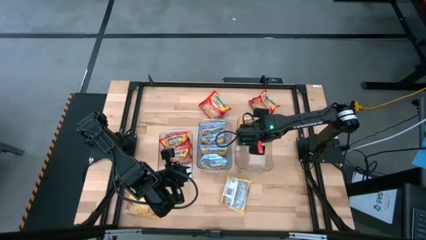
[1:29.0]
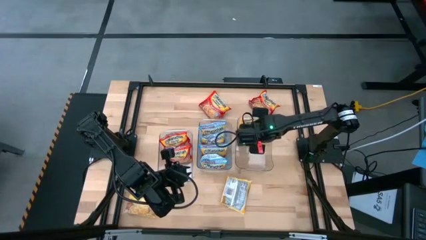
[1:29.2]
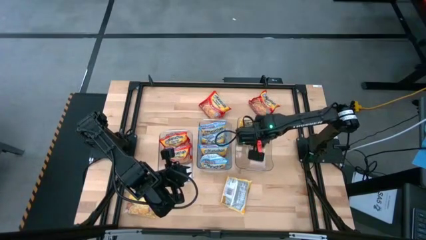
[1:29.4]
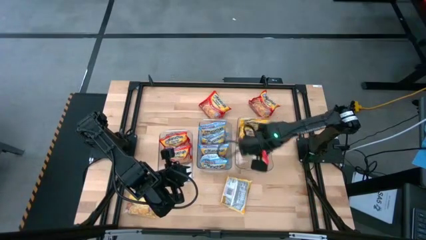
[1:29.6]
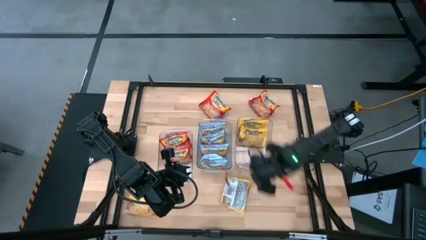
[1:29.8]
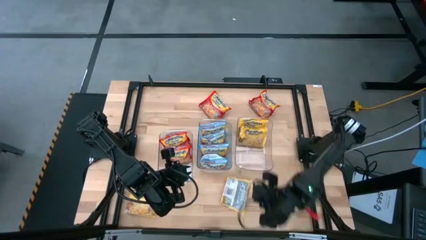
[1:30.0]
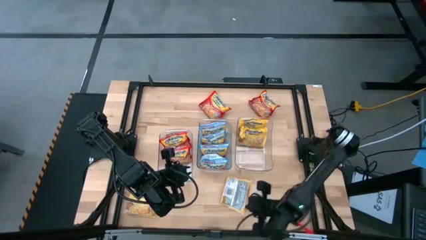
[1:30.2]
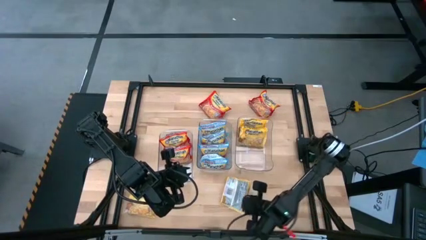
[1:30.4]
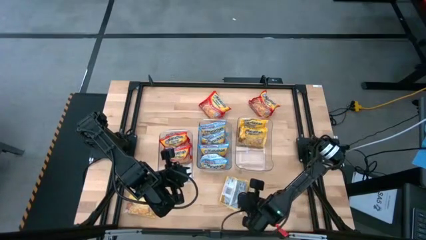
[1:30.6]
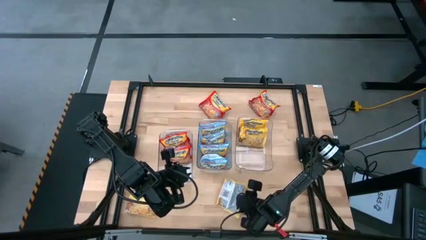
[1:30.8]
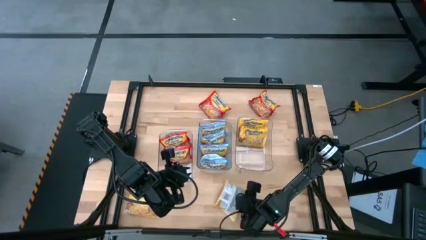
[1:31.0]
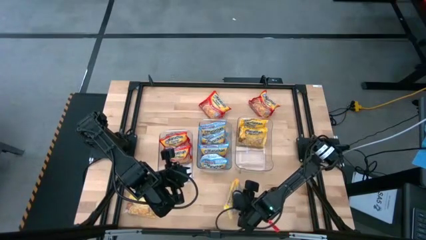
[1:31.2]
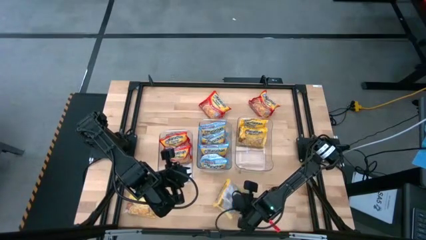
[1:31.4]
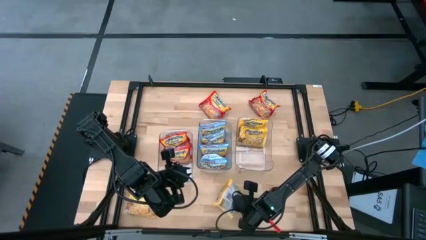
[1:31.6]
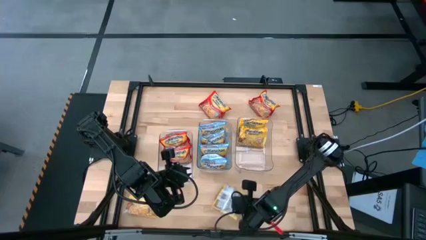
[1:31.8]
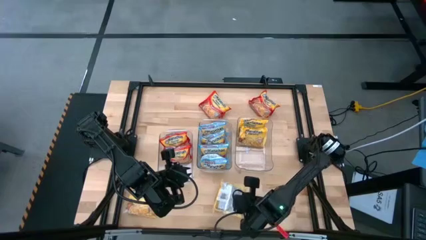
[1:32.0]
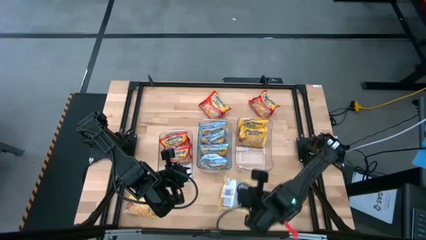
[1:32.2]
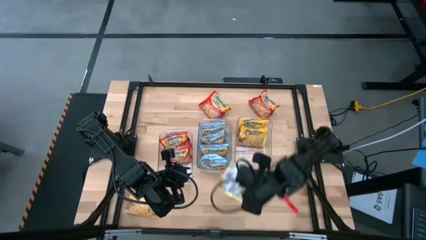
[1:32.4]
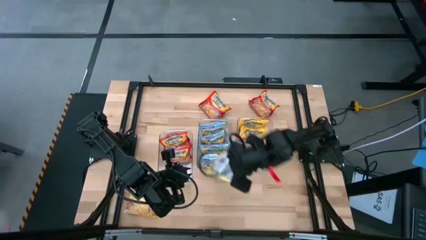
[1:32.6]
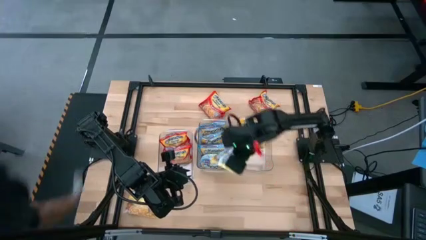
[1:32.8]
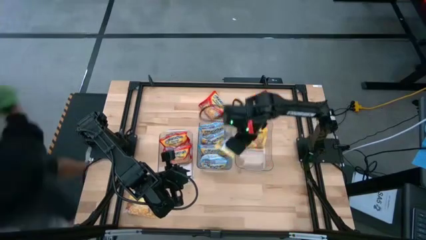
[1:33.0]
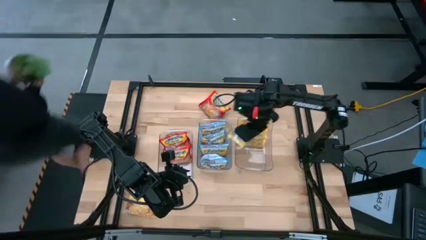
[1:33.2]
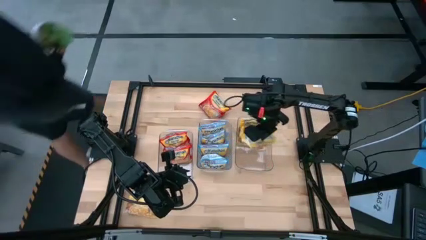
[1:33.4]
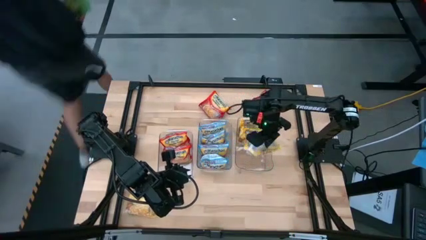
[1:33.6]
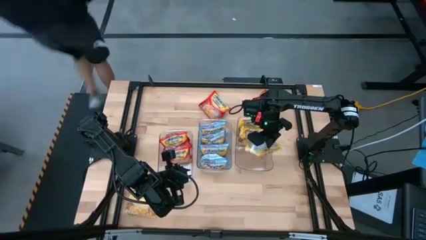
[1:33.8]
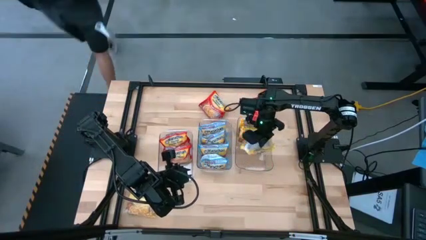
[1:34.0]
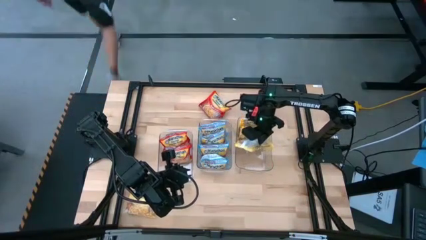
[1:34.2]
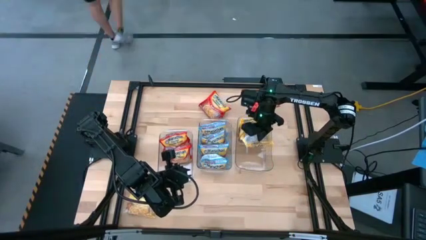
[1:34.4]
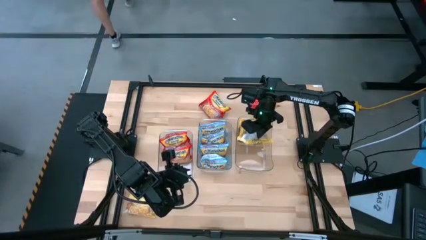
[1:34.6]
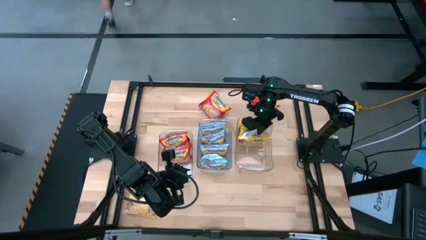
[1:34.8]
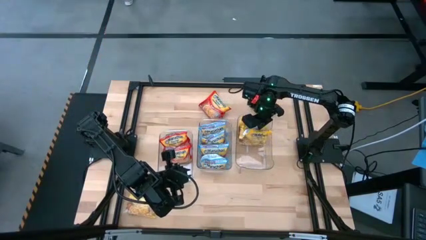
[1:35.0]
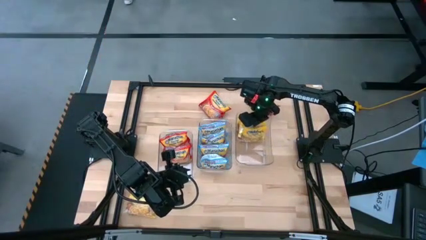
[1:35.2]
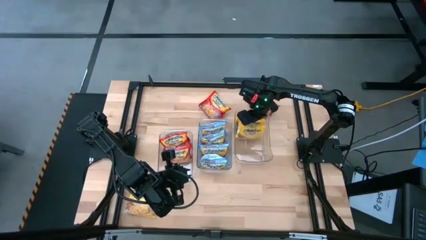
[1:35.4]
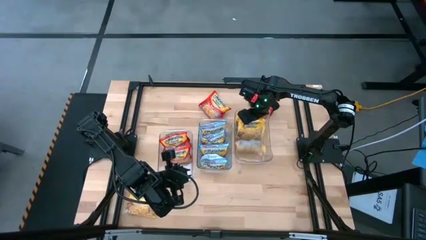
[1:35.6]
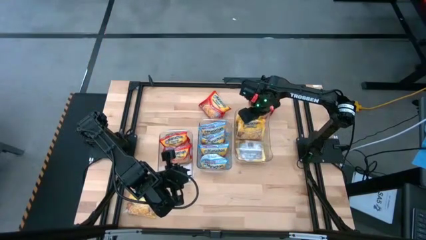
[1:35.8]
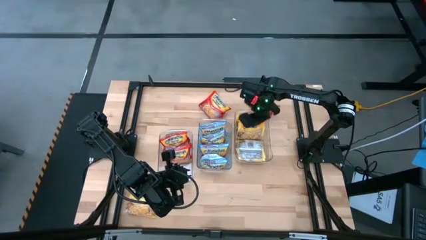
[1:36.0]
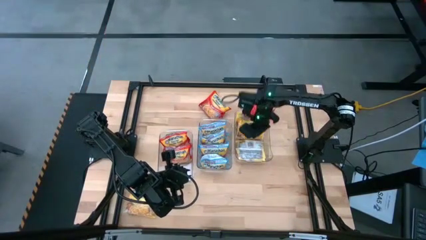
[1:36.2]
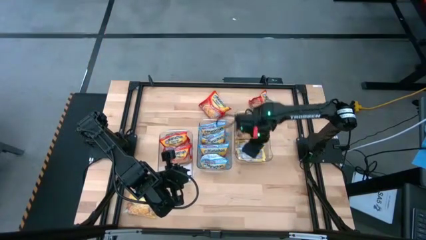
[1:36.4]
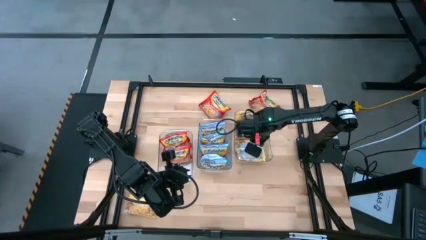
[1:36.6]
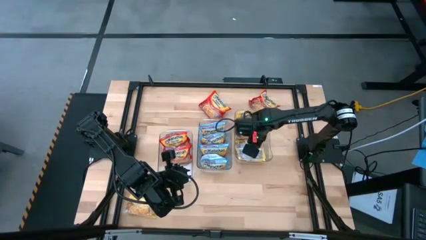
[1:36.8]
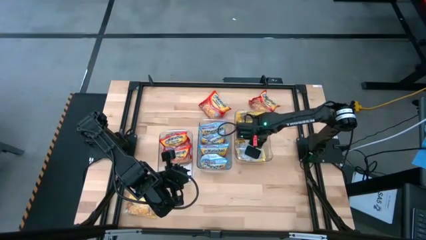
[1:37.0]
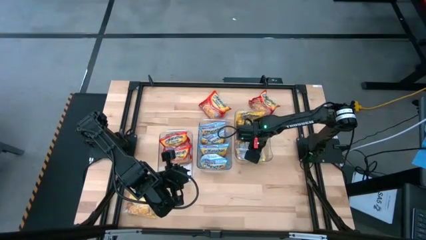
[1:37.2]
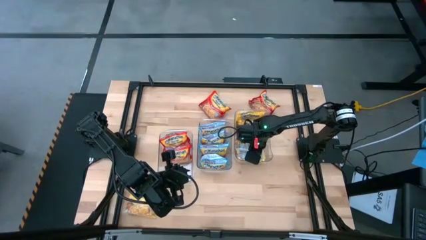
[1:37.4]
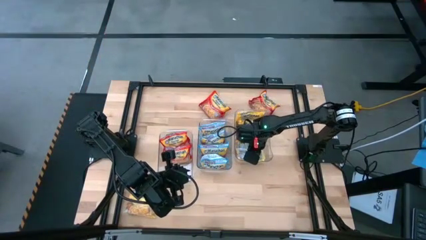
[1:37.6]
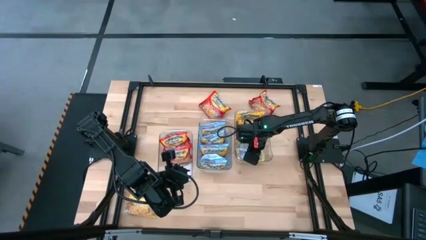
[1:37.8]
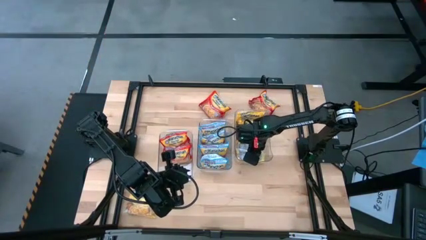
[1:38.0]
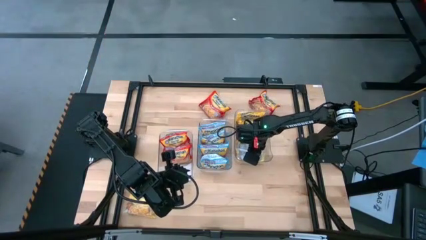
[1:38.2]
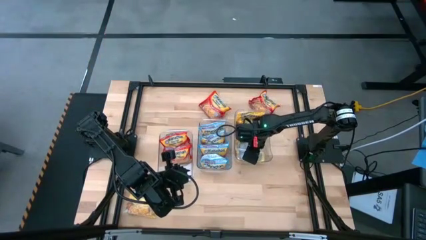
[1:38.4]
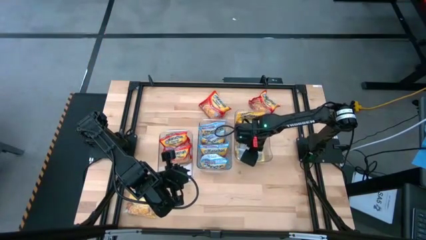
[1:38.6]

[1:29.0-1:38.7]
Task: Sort Maruchan noodles
Put the yellow noodle pack into the right transparent bin

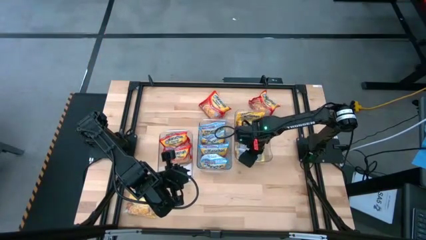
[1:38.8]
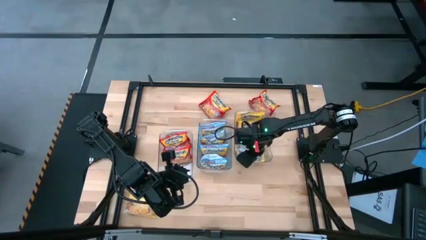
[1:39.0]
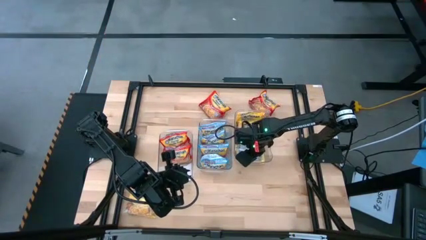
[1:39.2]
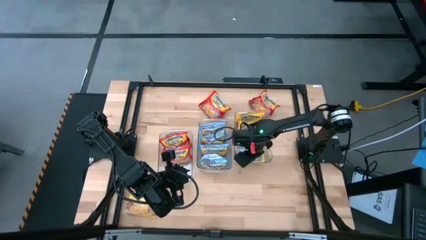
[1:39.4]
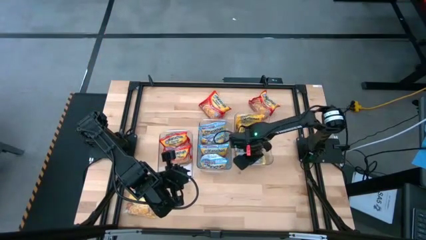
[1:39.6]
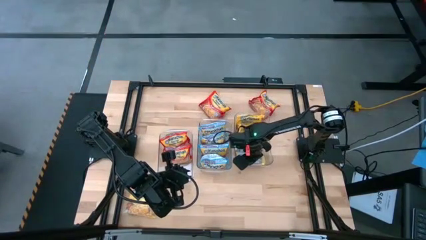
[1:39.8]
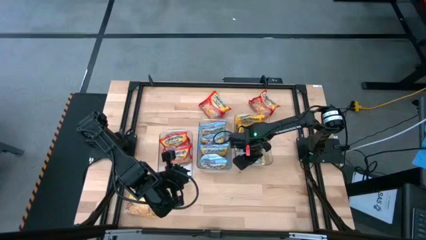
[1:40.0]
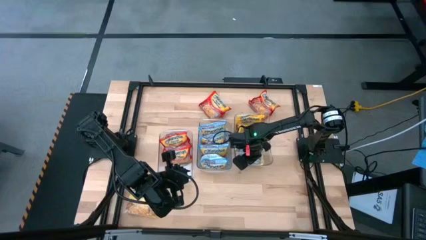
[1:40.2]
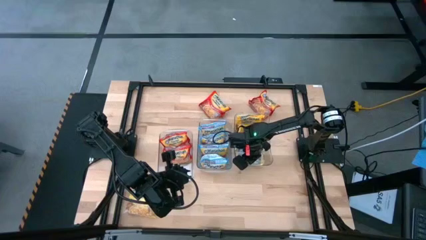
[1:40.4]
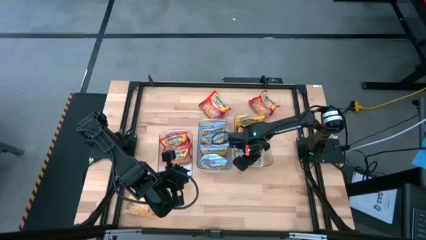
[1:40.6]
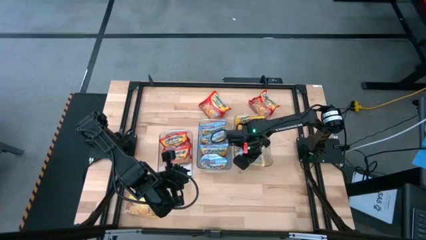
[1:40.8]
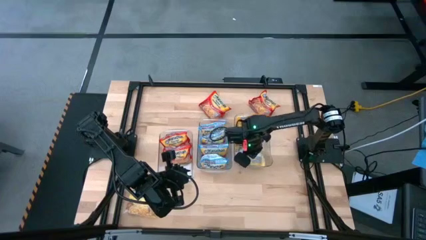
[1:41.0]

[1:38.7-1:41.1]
Adjust the yellow noodle pack

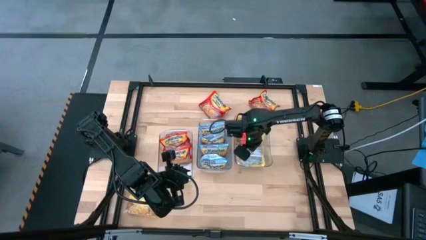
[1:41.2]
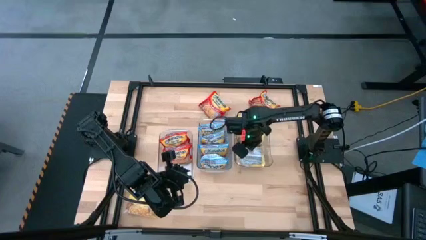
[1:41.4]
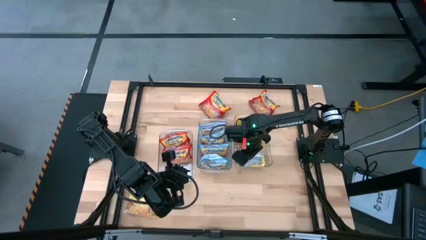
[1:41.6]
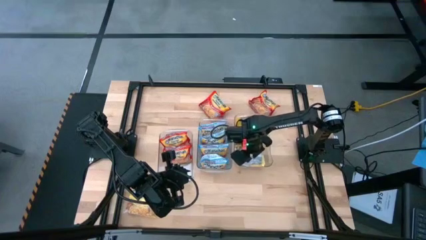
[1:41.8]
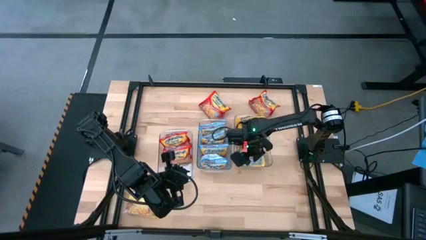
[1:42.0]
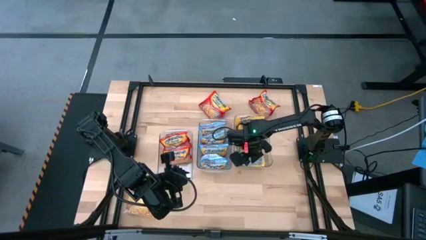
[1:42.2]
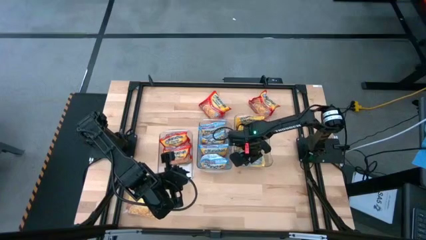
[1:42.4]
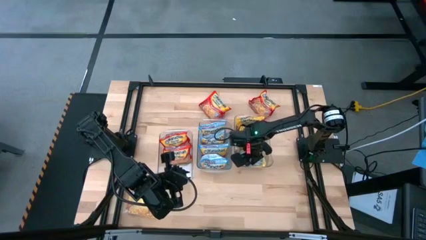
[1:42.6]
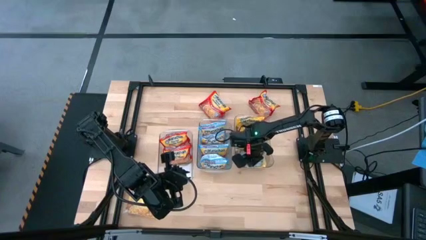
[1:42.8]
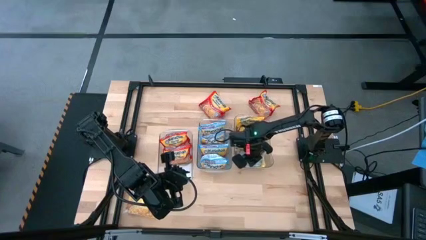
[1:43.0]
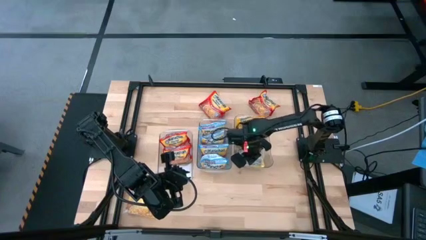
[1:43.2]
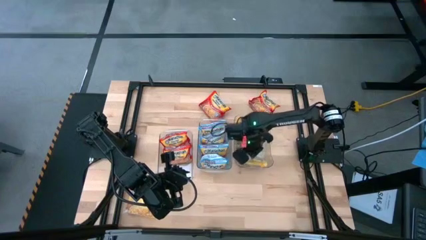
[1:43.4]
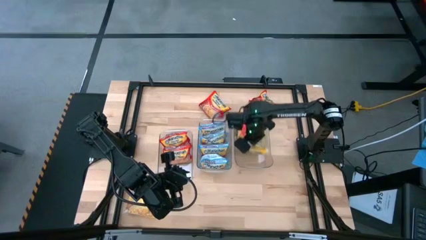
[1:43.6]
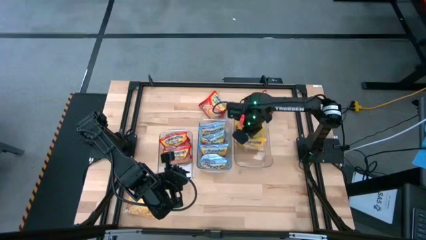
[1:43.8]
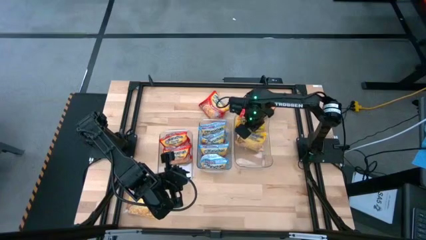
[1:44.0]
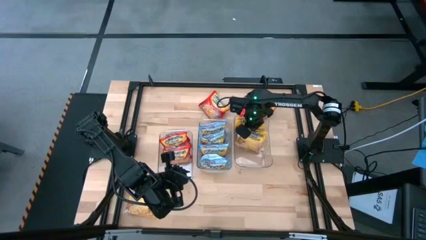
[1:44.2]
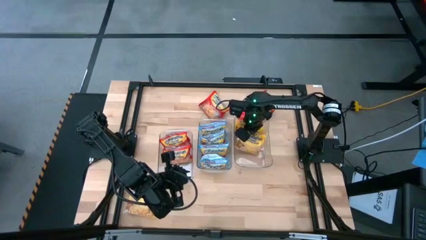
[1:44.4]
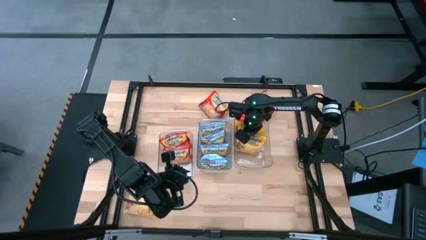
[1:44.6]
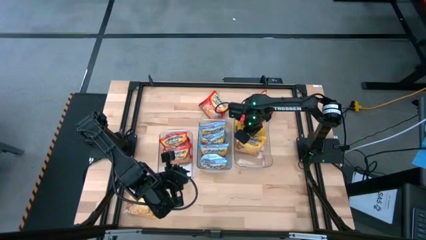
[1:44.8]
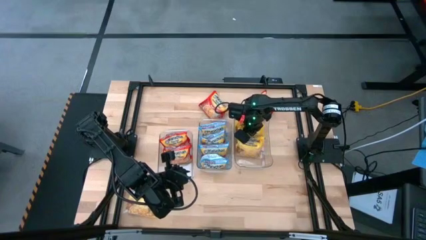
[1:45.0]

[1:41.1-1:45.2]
Adjust the yellow noodle pack
